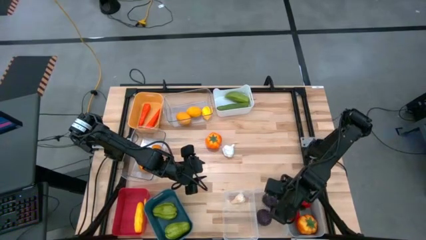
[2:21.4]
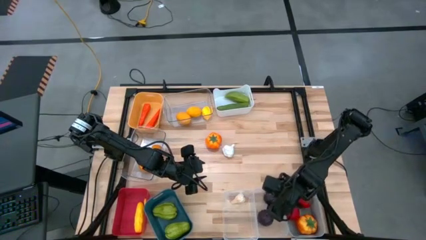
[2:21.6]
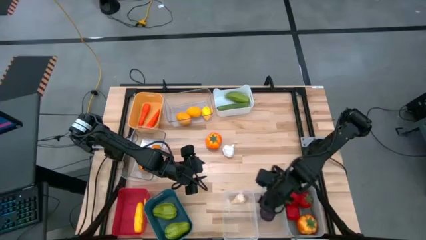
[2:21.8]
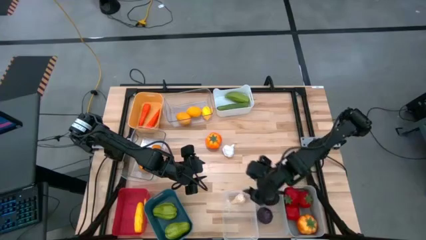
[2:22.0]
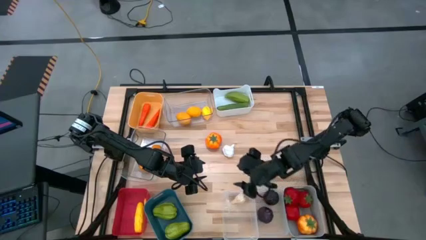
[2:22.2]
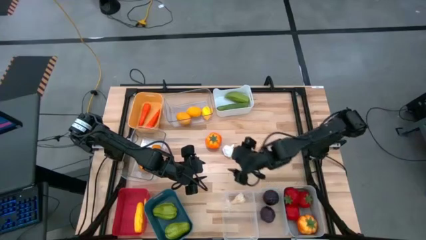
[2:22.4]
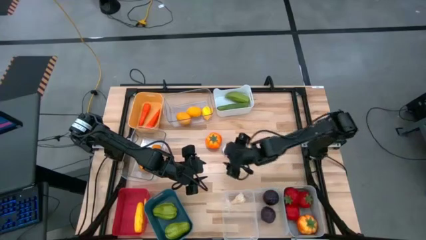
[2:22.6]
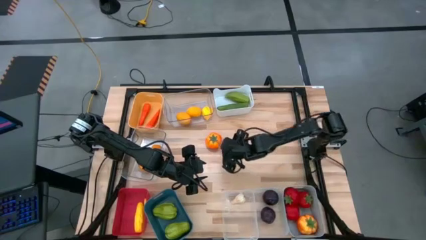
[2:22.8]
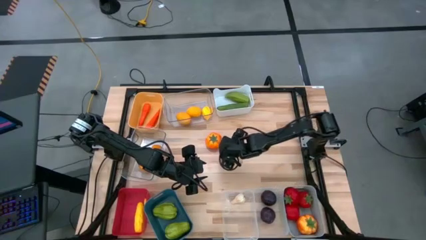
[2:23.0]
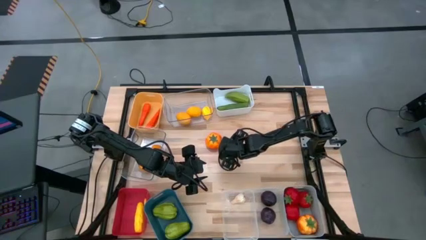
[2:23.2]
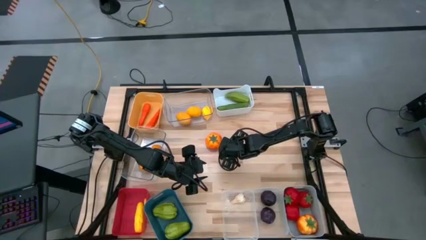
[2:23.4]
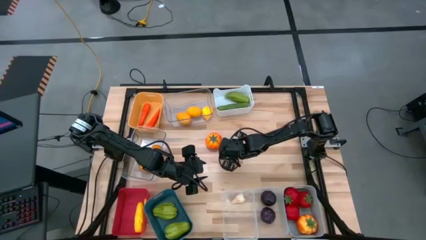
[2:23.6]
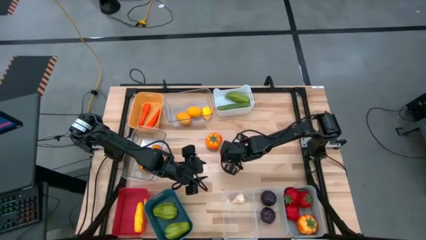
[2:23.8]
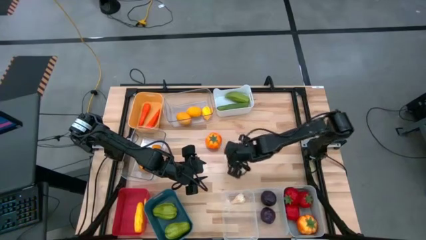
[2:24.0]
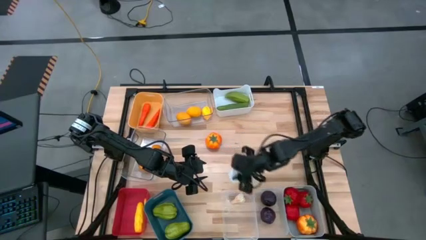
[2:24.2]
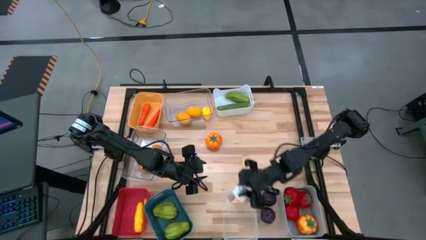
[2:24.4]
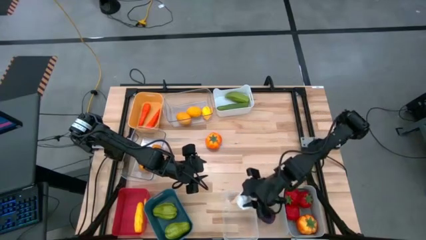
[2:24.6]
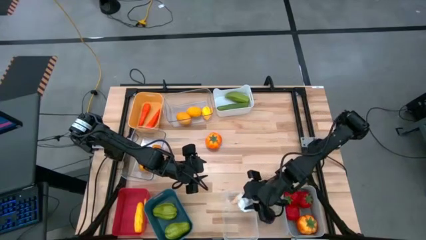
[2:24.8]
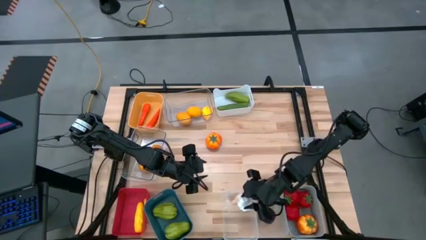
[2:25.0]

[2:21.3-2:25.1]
Task: Sort produce into baskets
Put the white garlic into the bottom left transparent bin

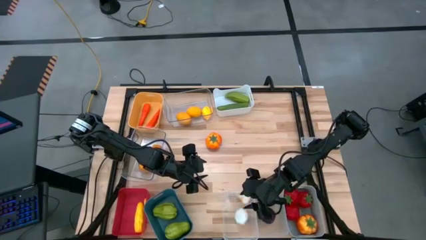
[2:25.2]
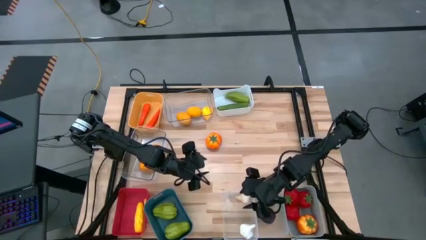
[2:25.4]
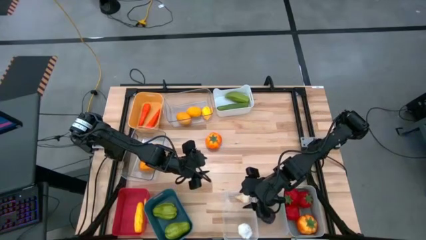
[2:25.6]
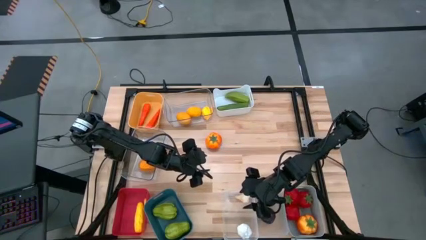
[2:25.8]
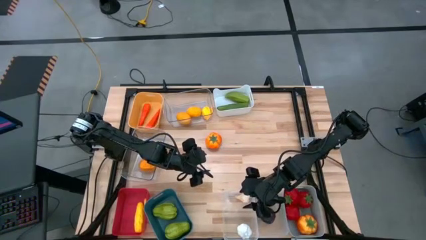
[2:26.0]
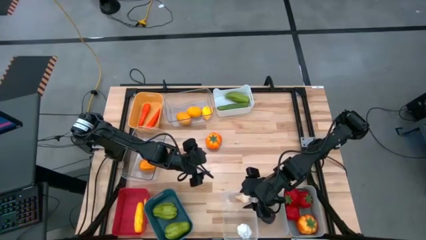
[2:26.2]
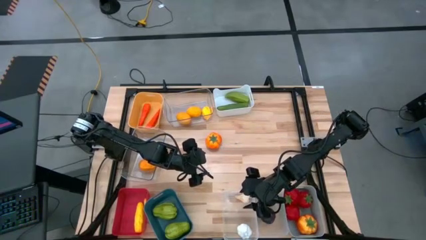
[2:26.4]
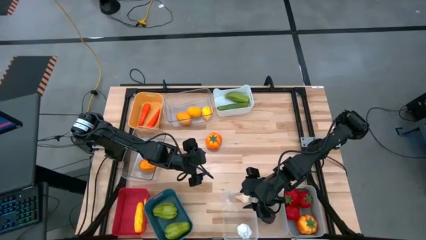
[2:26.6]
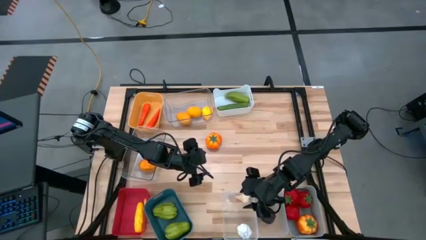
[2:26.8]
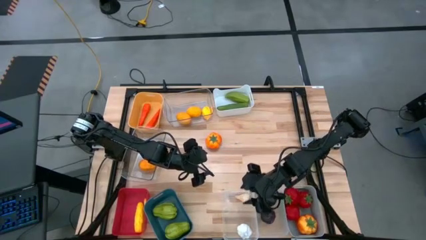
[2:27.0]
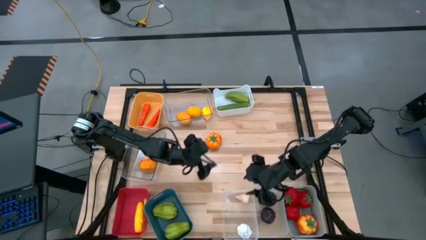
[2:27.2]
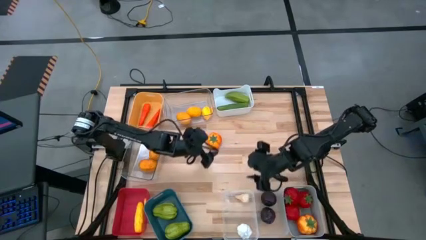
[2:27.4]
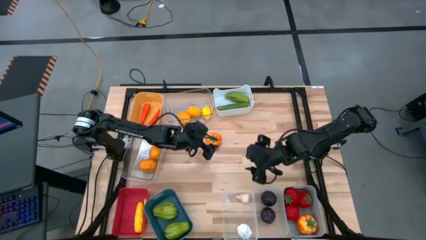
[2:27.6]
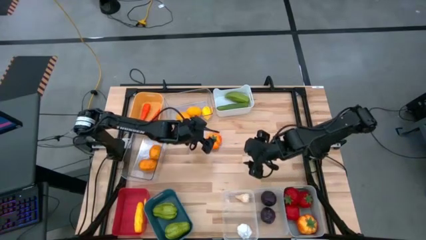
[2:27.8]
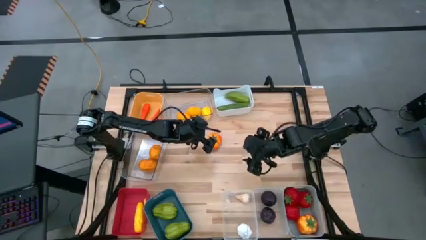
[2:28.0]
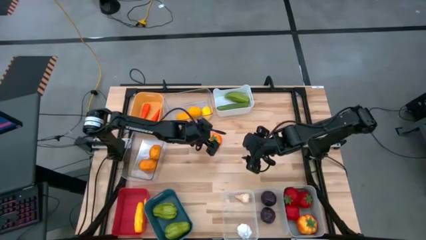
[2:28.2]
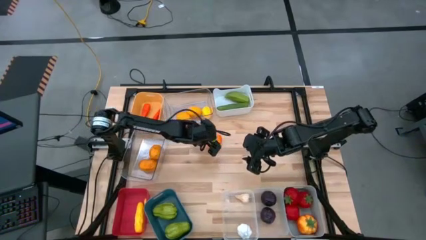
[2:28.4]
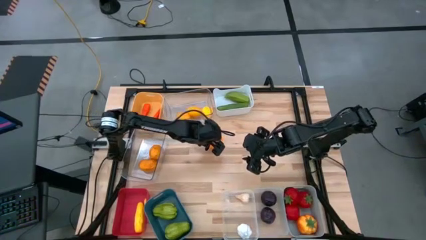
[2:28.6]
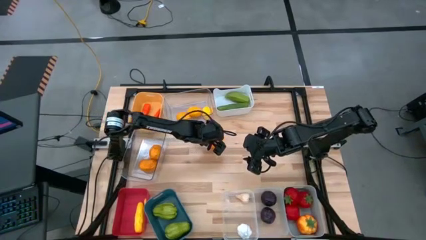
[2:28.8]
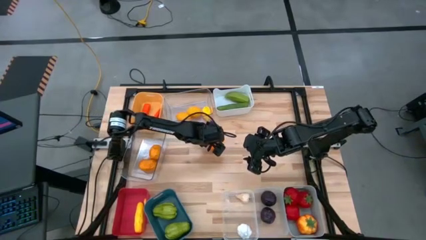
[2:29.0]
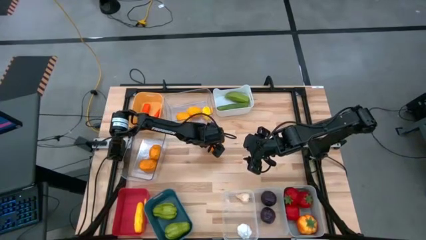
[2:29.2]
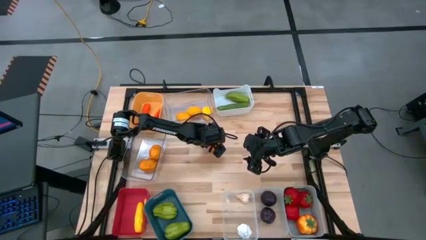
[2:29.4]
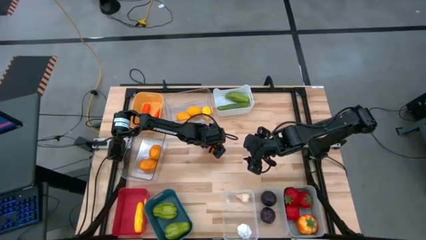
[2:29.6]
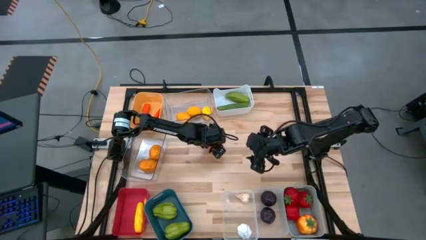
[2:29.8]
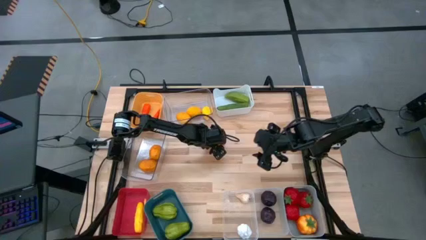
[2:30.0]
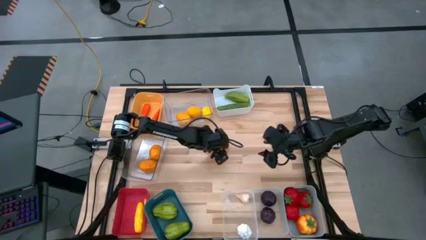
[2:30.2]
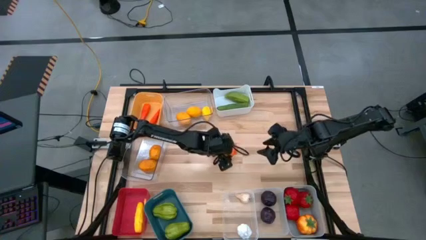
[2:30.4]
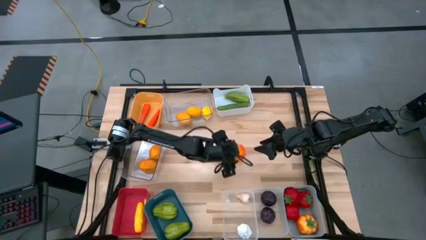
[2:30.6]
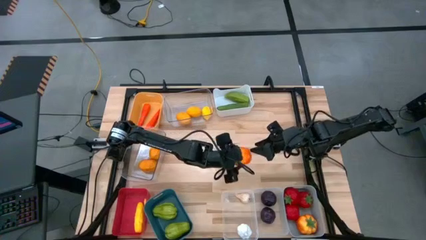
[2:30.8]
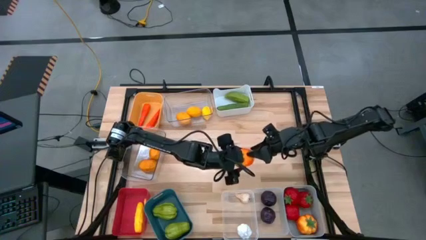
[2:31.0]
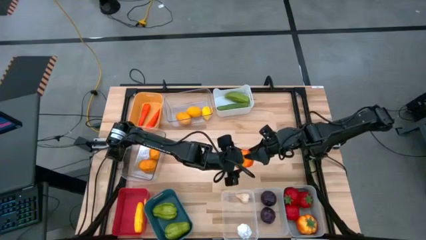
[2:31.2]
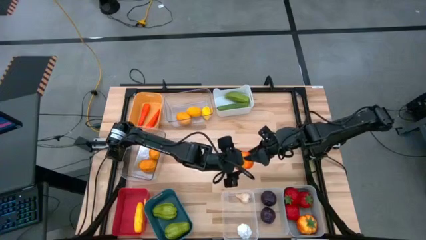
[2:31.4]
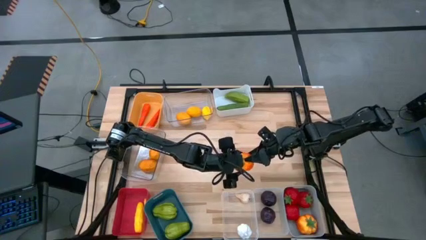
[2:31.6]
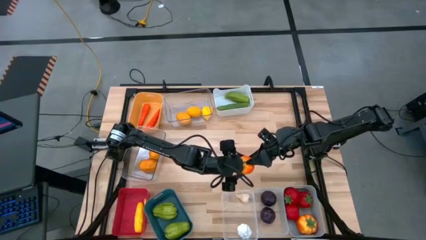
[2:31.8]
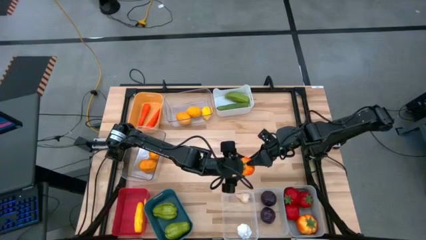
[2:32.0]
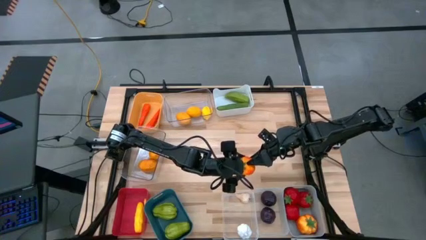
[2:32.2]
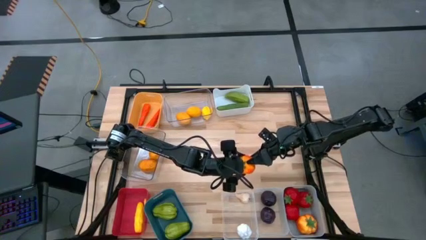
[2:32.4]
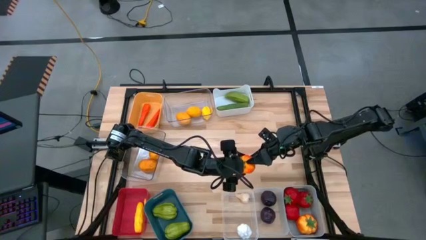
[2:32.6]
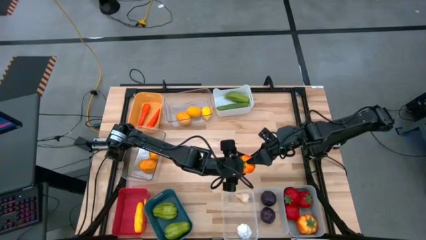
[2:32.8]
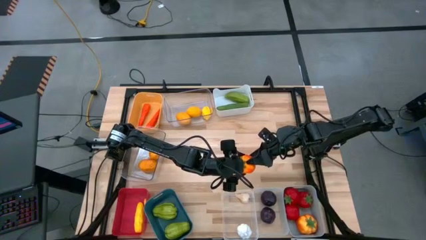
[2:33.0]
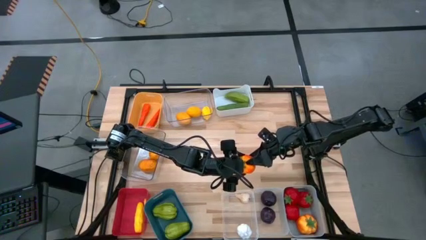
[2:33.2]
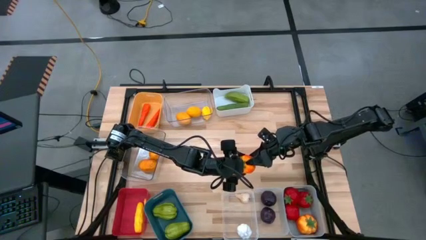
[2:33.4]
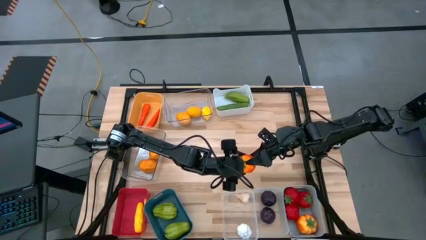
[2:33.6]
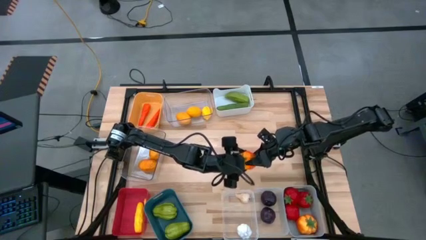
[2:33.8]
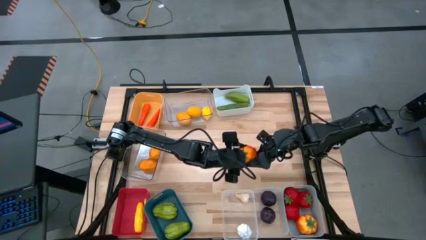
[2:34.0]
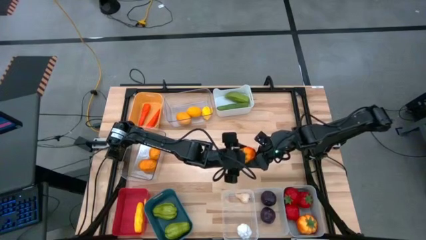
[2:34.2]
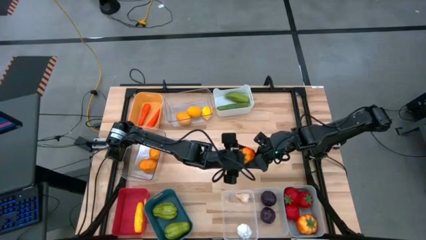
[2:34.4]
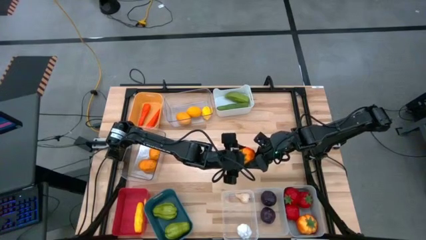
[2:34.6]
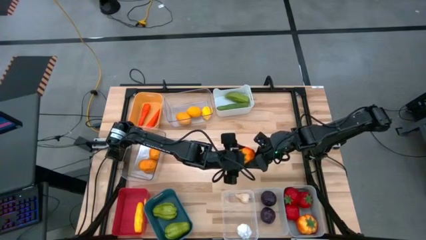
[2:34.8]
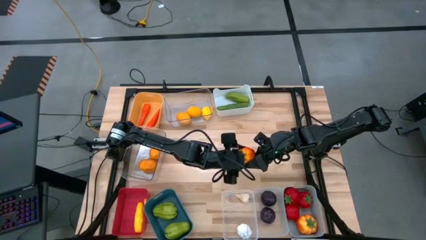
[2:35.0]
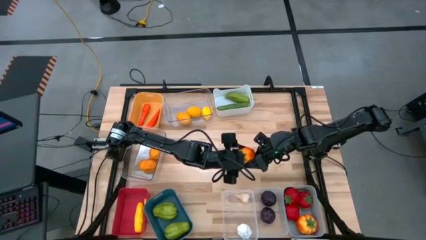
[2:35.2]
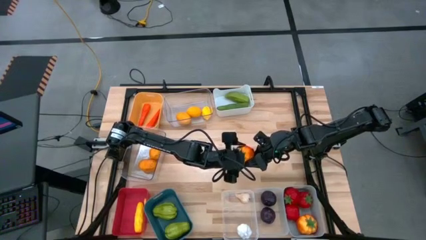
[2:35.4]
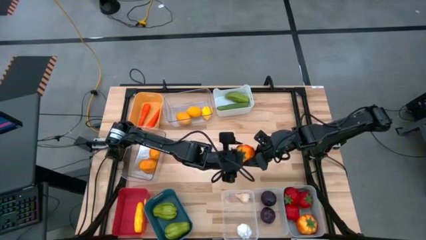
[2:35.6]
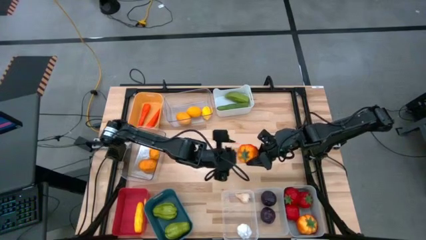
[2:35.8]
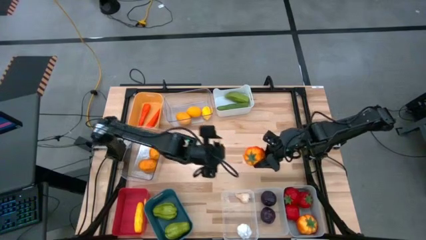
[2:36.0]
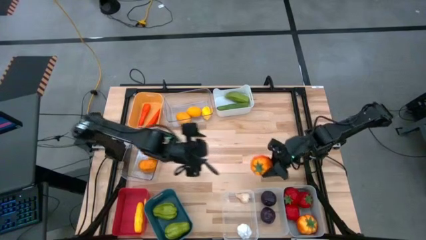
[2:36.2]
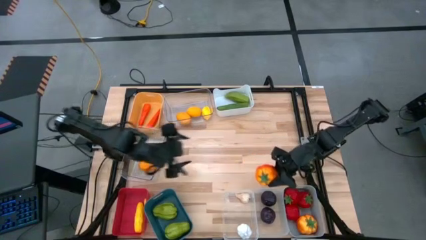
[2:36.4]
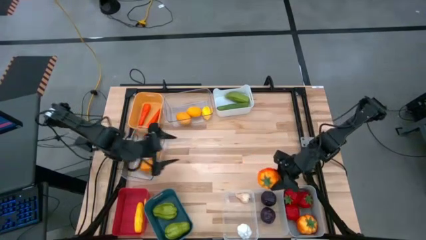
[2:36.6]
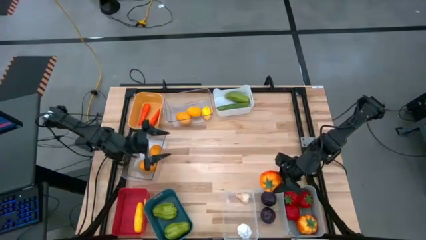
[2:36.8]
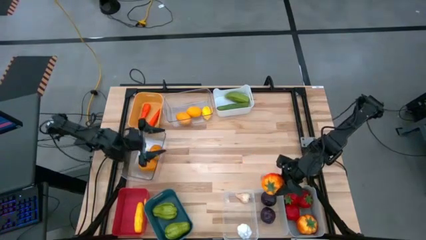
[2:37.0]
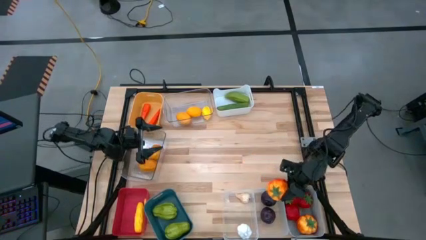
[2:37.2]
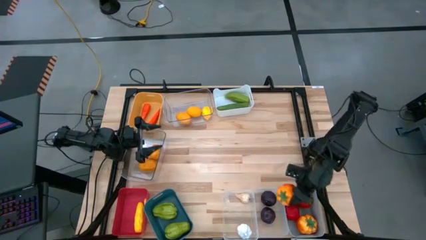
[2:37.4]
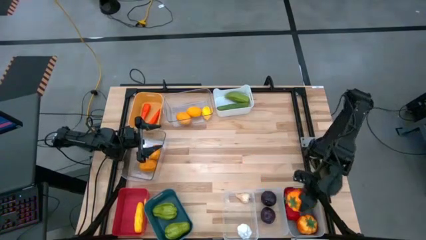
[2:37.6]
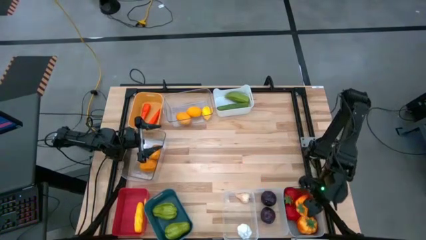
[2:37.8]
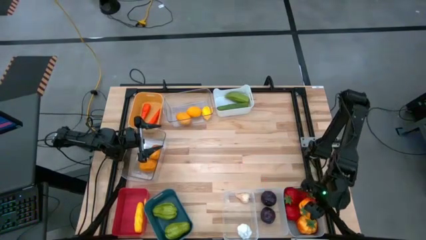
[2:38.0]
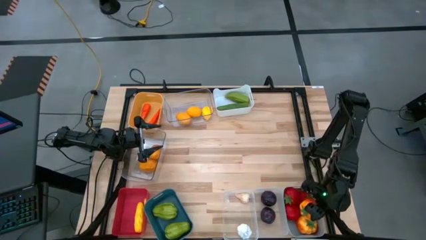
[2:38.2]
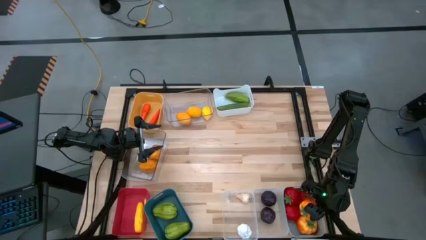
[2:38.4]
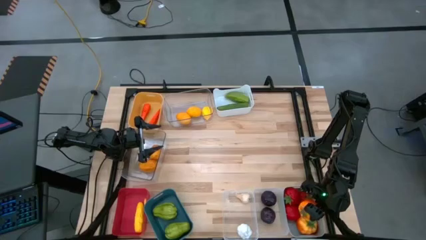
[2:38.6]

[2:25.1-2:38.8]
Put the orange tomato into the gray bin
